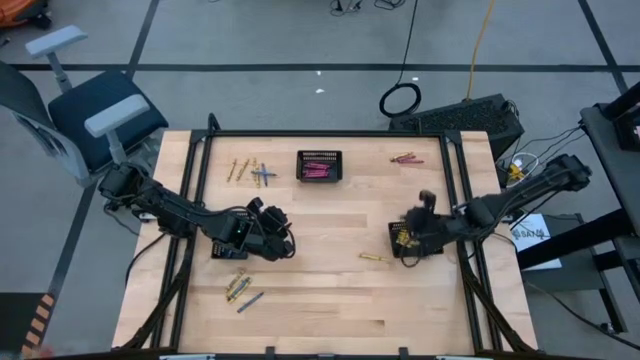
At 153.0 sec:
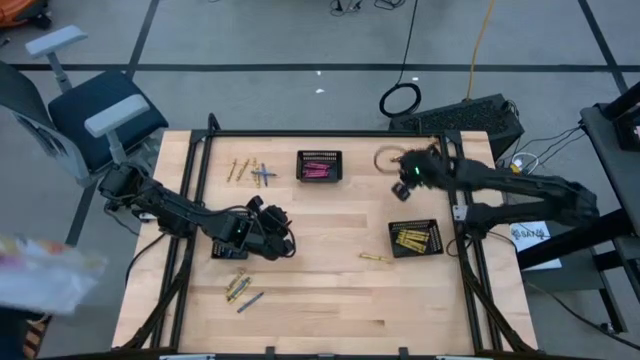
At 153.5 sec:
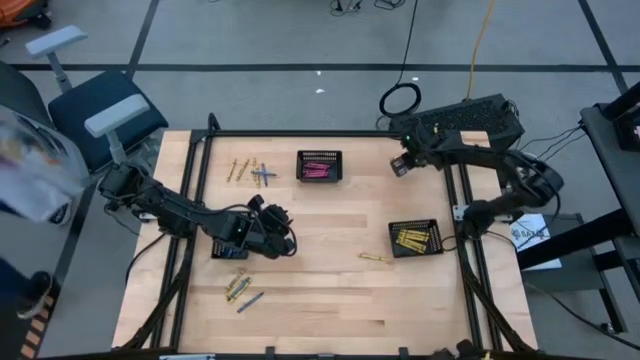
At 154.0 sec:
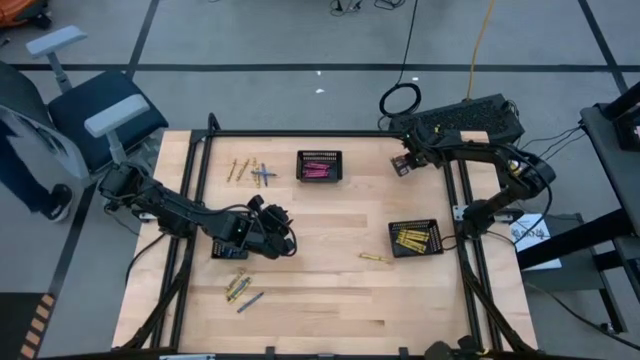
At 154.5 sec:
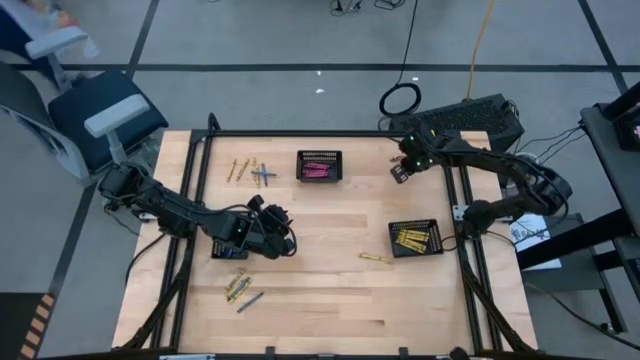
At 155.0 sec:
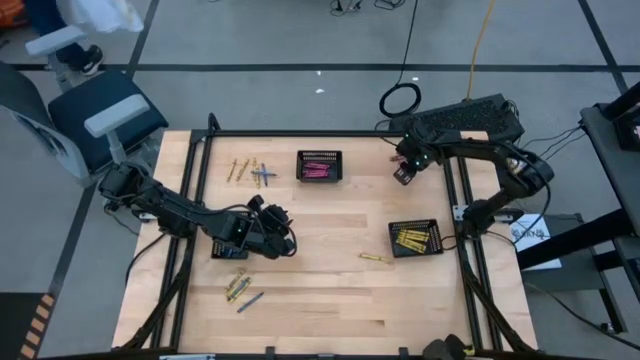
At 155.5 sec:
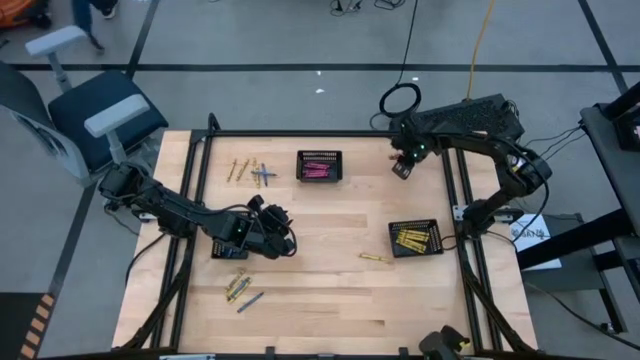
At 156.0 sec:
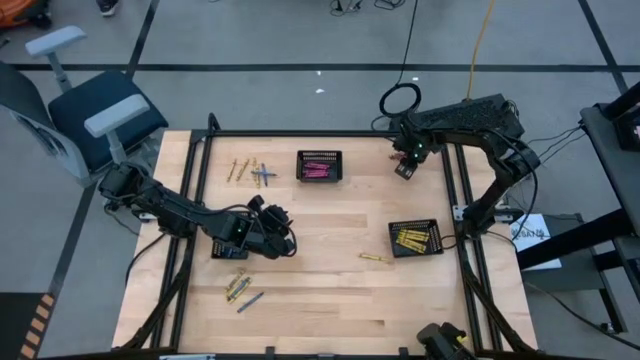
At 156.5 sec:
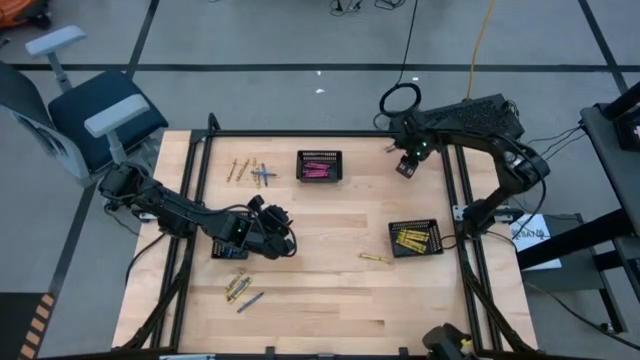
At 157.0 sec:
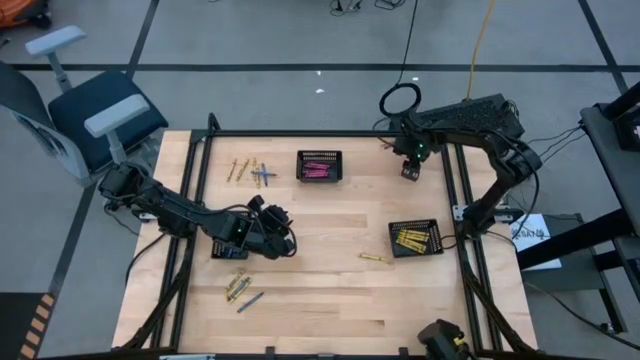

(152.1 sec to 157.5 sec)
Task: Sort crayons
Put the bottom red crayon into the top black bin

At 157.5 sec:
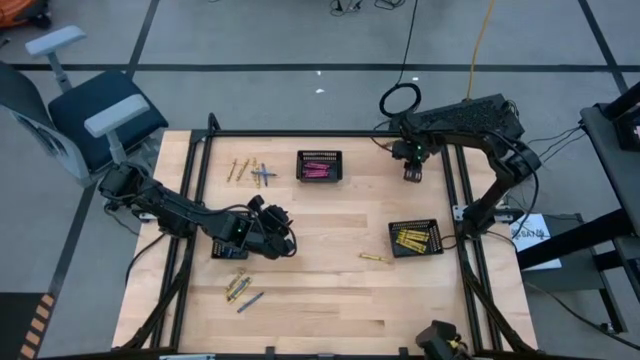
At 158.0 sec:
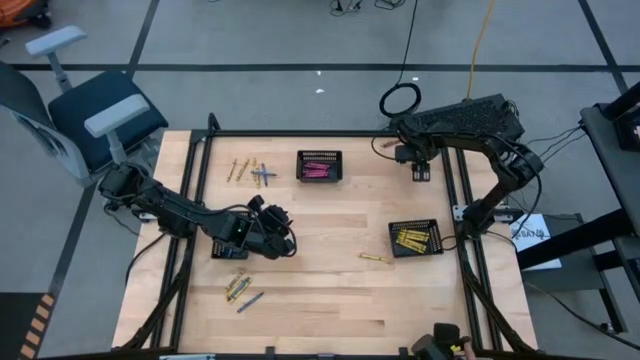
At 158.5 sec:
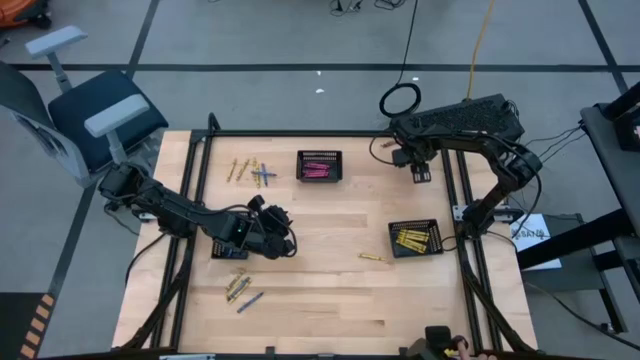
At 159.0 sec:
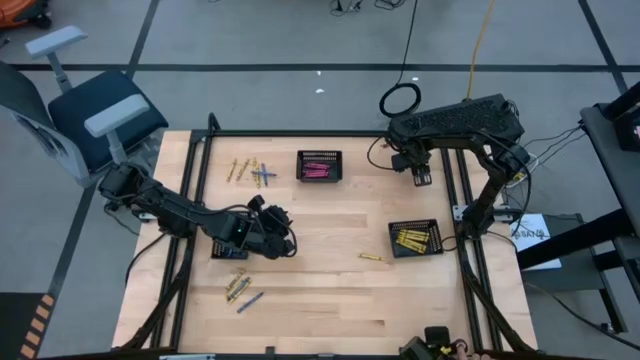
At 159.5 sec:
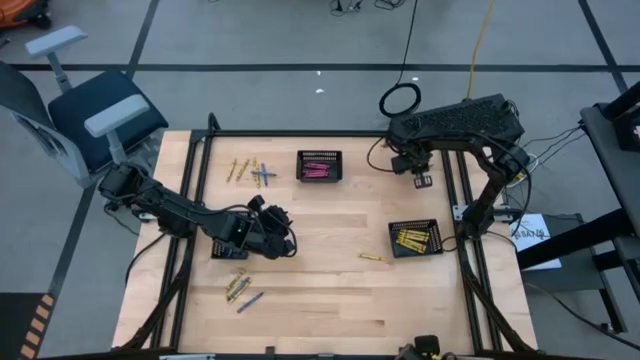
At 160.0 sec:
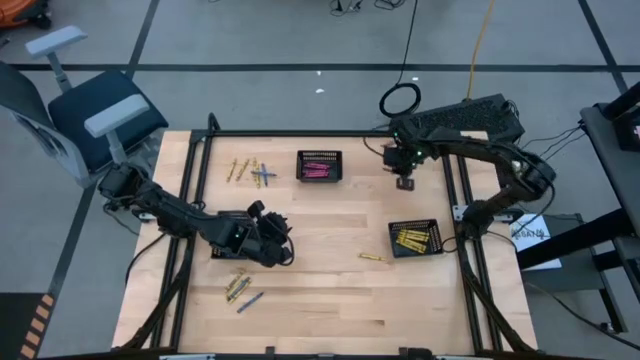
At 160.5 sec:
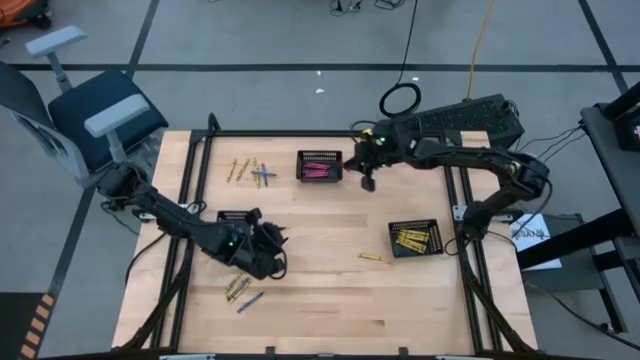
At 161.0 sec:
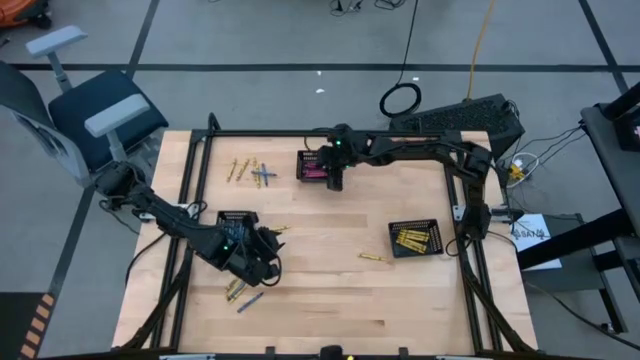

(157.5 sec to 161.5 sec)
Put the bottom red crayon into the top black bin

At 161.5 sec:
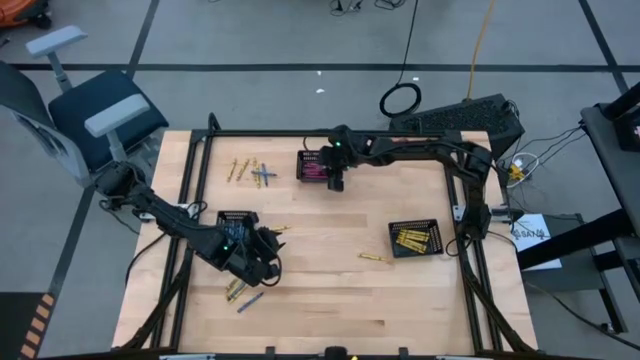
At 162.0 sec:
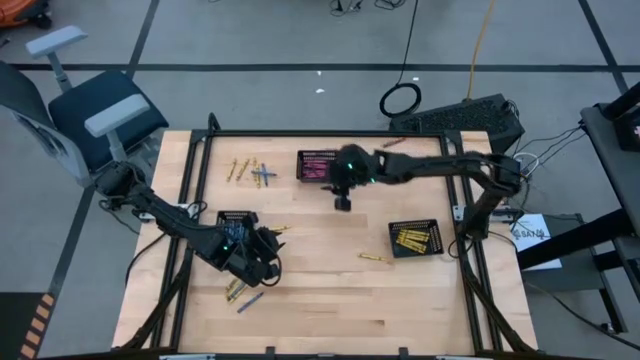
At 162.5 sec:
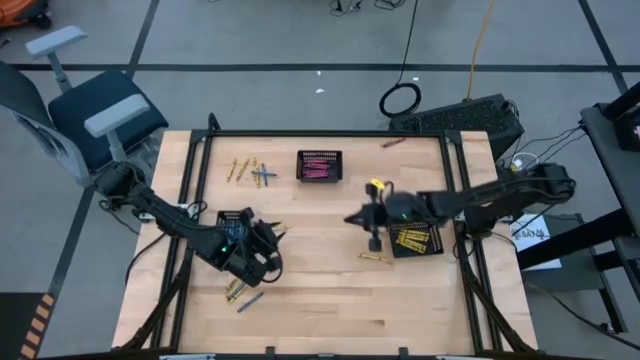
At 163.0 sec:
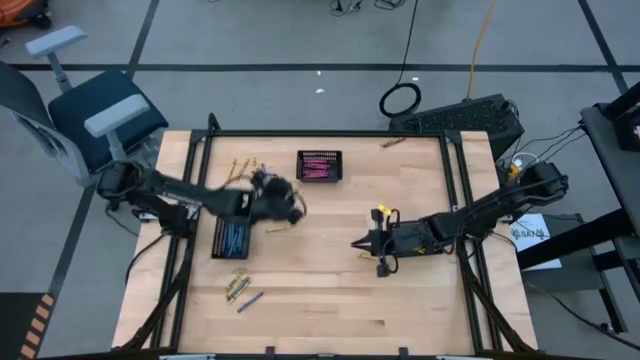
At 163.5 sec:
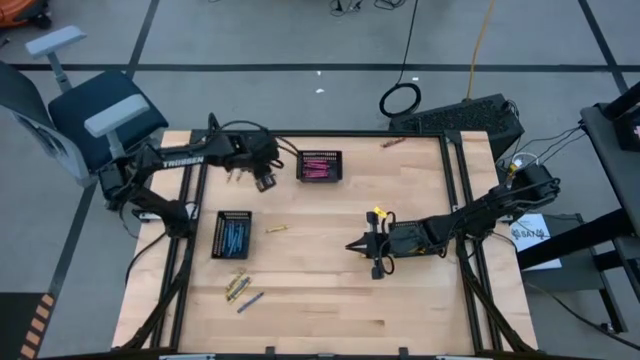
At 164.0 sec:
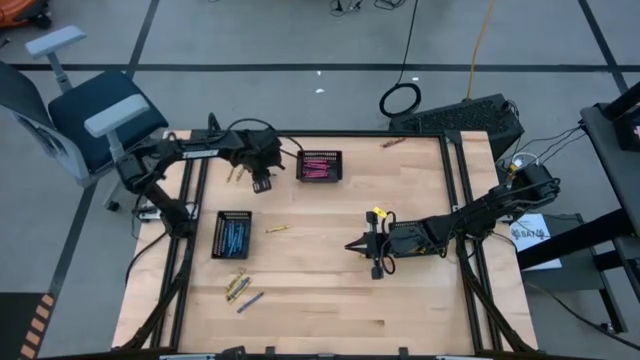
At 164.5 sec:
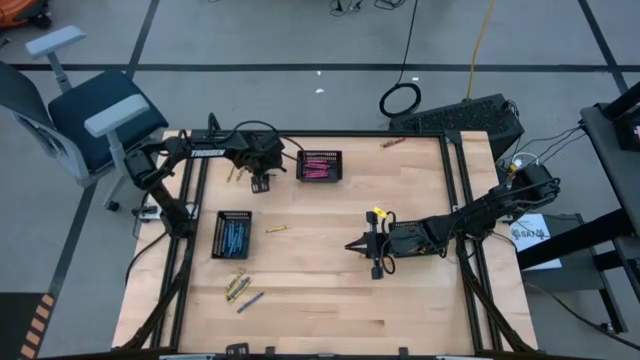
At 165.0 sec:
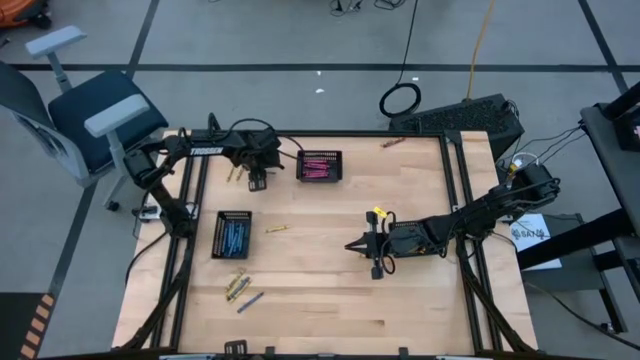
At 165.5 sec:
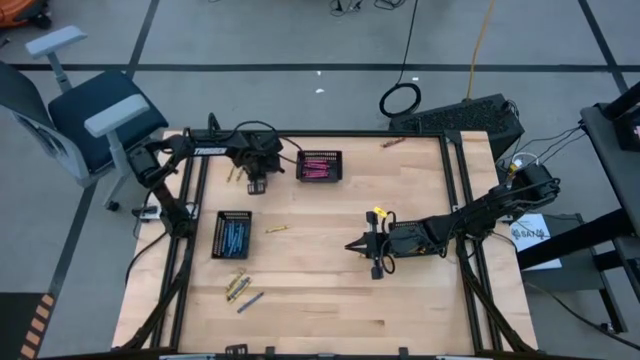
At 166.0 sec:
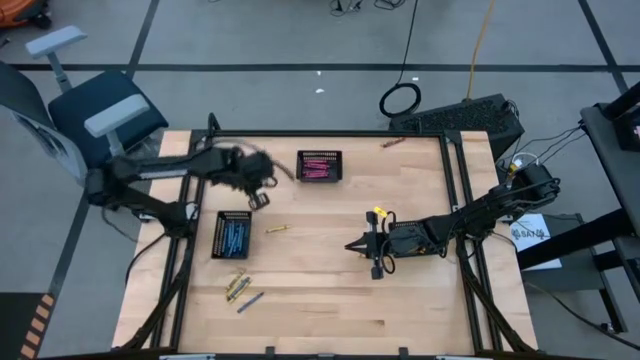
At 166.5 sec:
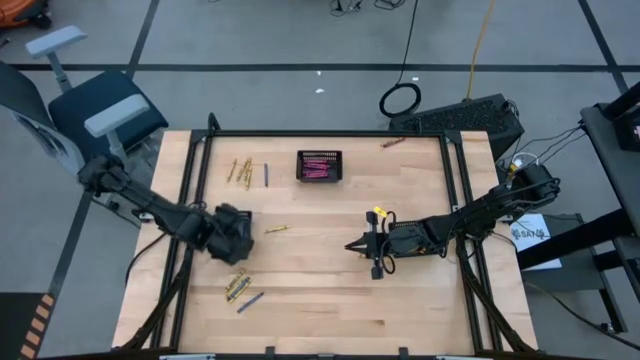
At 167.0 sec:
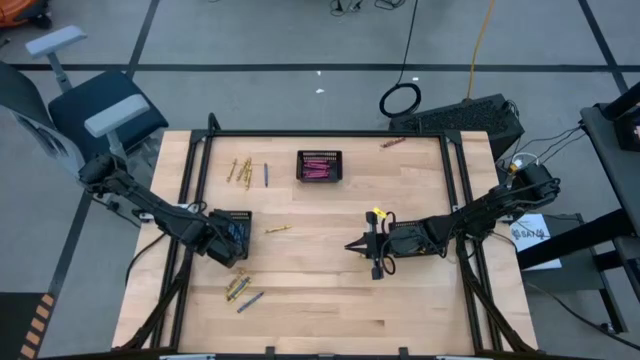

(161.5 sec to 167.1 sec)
Put the blue crayon into the bottom left black bin

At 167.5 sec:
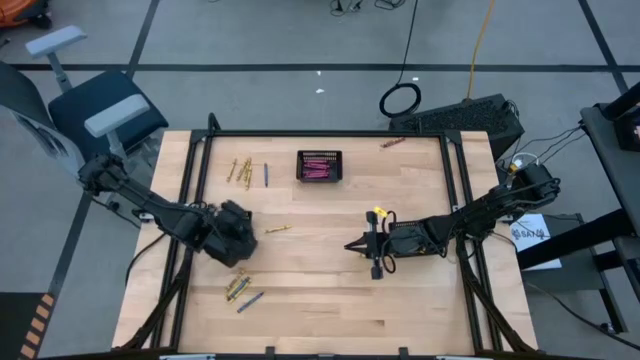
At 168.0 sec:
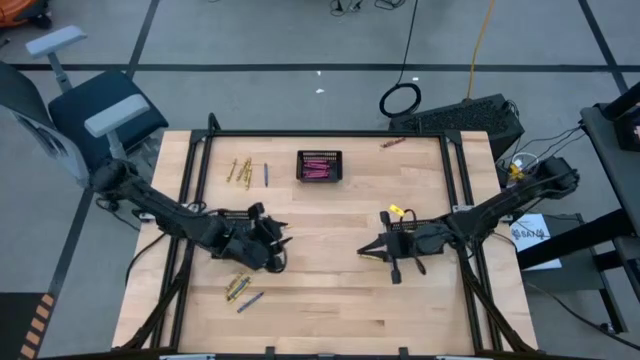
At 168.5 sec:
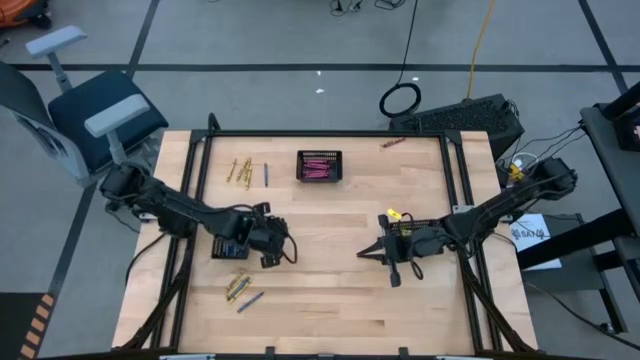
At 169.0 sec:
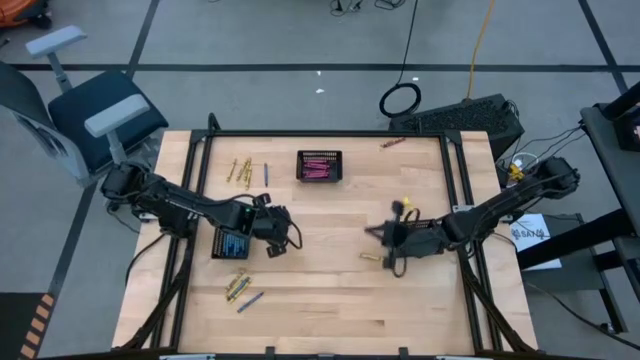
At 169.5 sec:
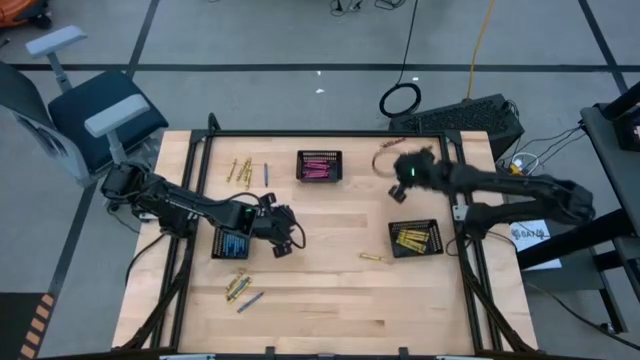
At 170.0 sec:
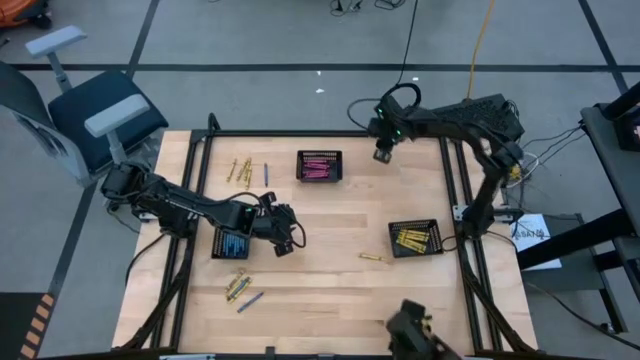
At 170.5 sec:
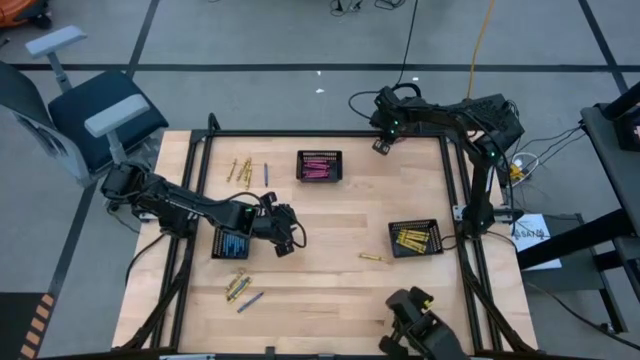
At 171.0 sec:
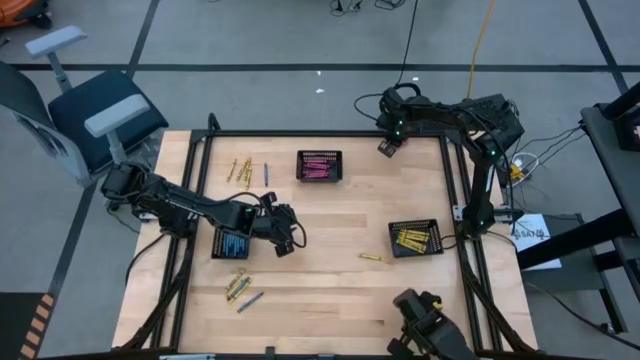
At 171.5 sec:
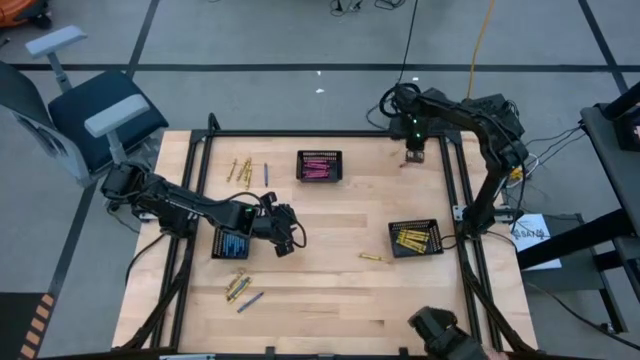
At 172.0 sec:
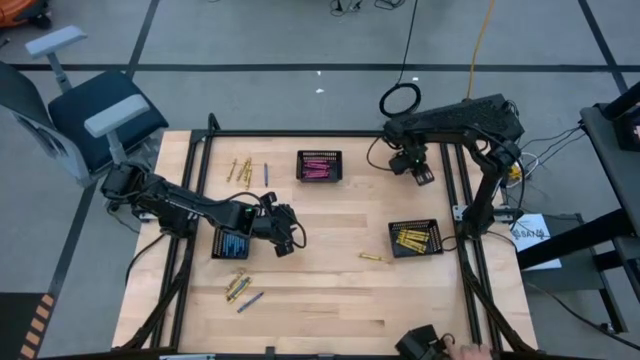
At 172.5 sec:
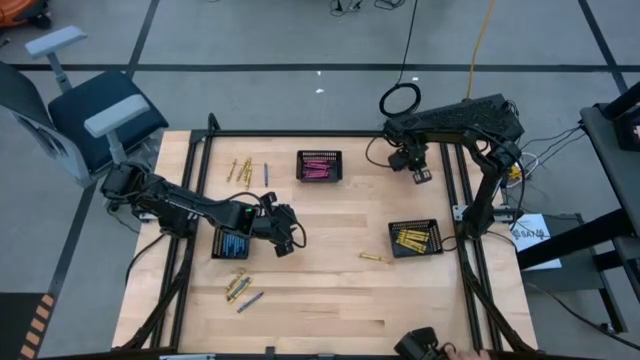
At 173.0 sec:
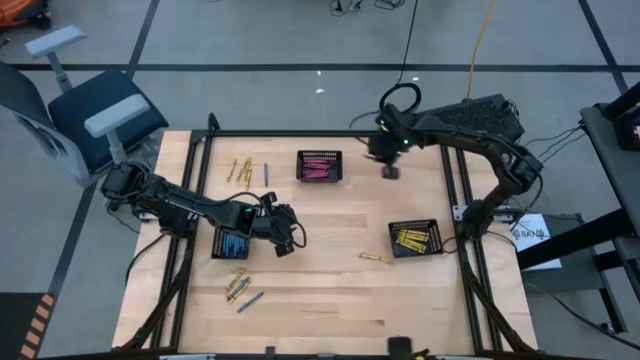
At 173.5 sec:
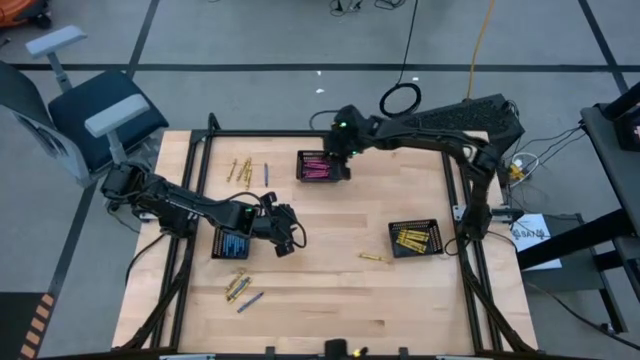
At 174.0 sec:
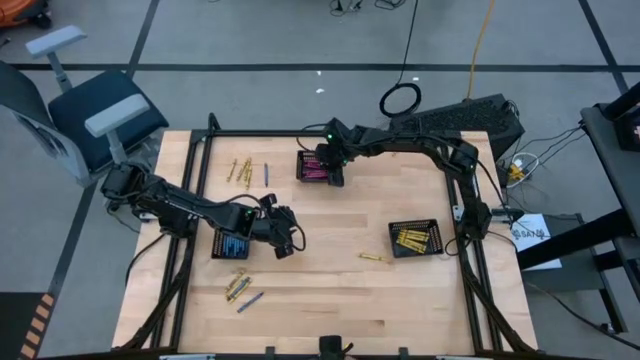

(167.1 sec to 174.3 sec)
Put the red crayon into the top black bin
